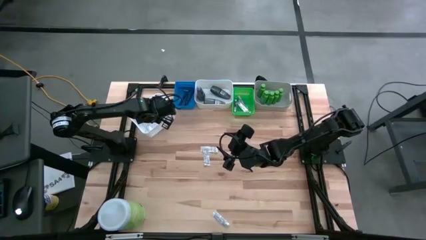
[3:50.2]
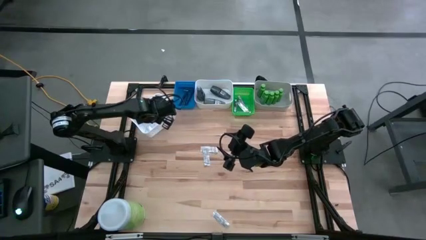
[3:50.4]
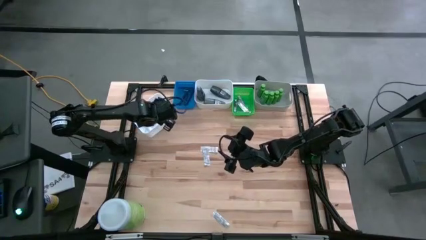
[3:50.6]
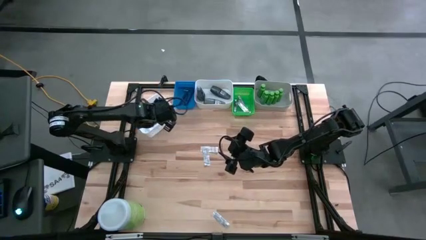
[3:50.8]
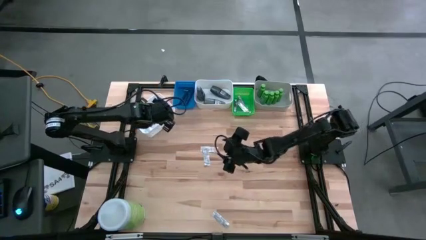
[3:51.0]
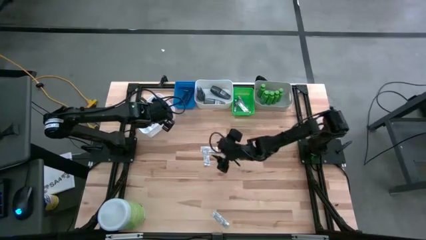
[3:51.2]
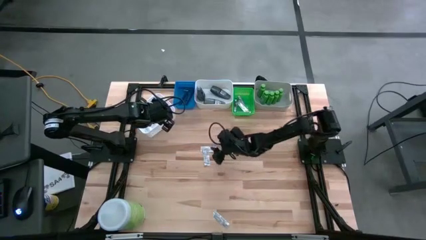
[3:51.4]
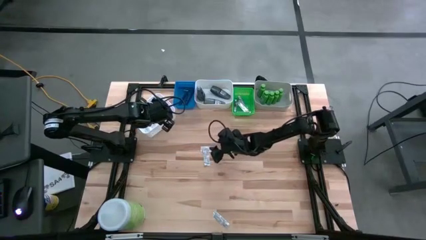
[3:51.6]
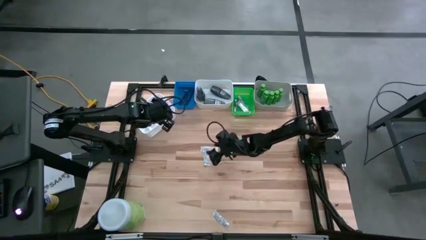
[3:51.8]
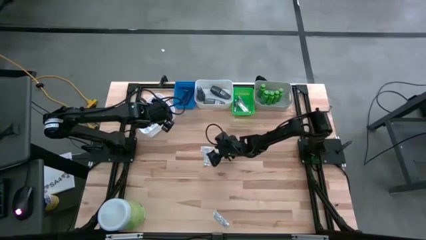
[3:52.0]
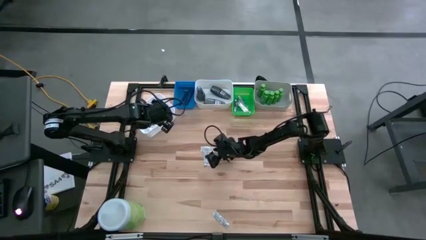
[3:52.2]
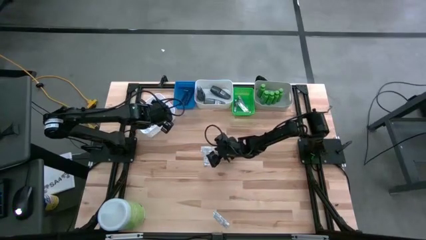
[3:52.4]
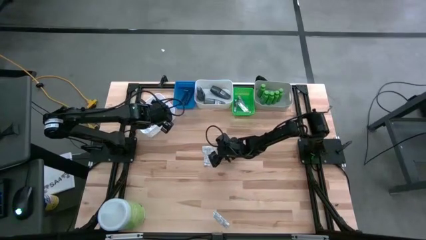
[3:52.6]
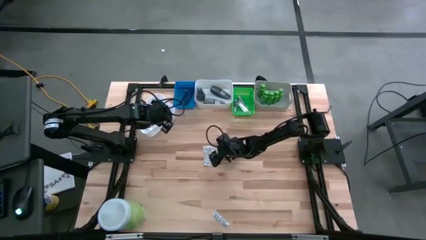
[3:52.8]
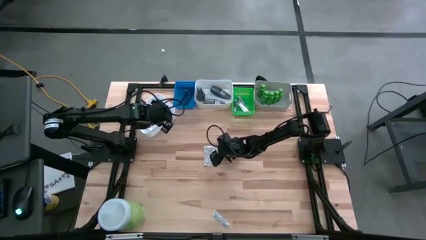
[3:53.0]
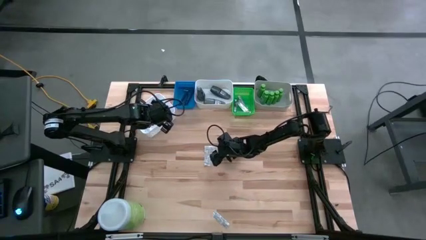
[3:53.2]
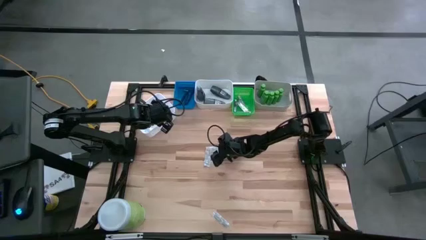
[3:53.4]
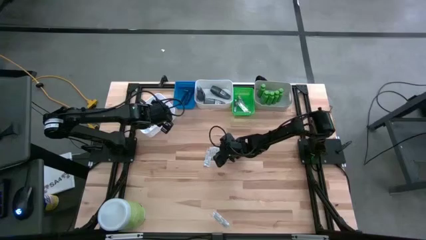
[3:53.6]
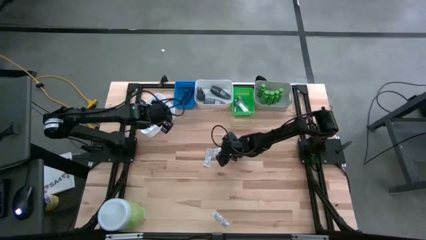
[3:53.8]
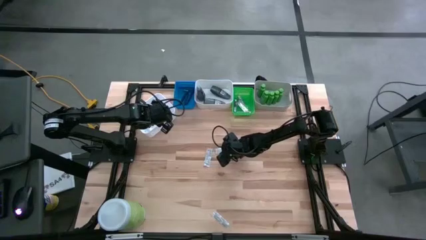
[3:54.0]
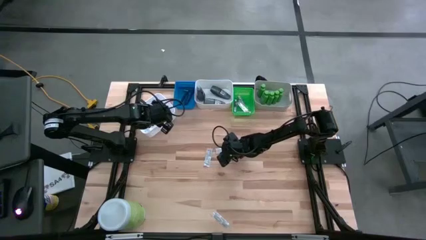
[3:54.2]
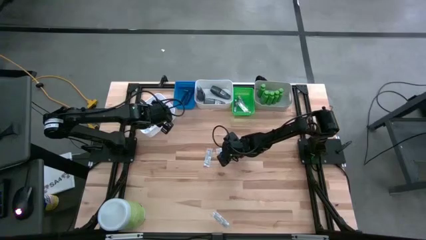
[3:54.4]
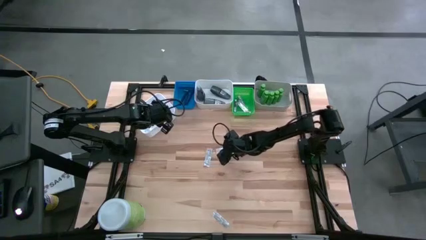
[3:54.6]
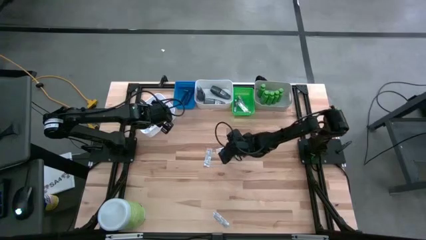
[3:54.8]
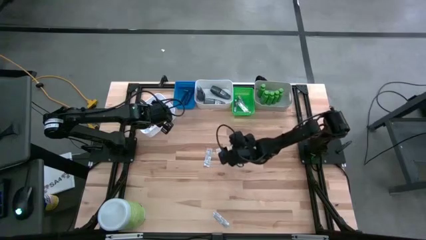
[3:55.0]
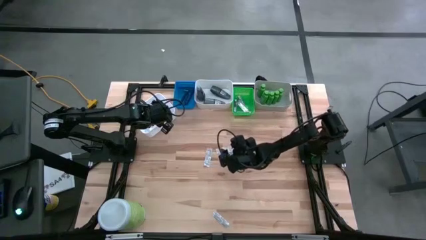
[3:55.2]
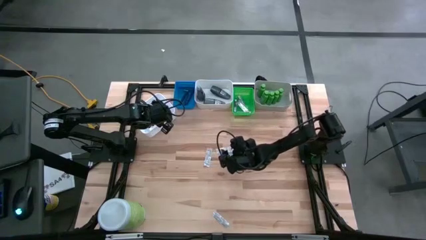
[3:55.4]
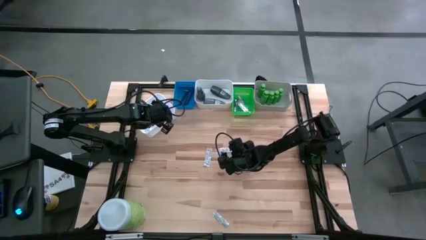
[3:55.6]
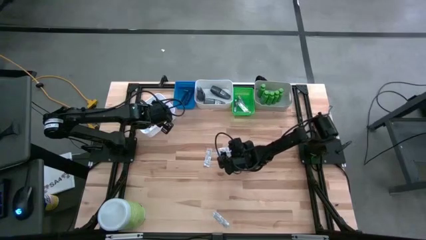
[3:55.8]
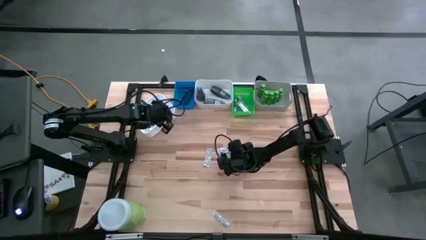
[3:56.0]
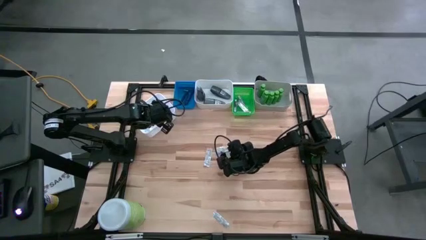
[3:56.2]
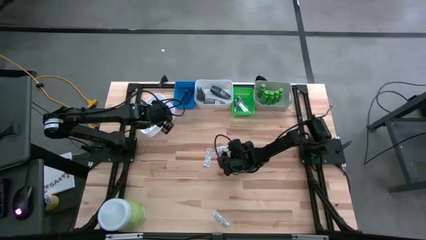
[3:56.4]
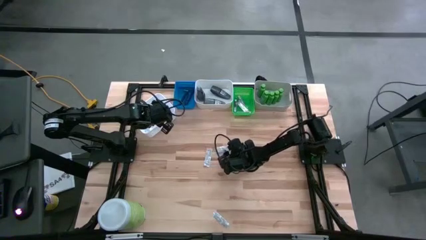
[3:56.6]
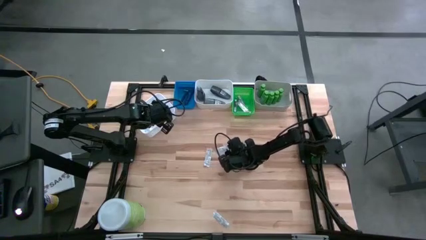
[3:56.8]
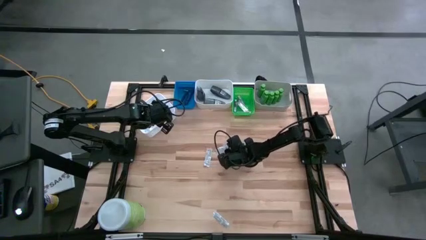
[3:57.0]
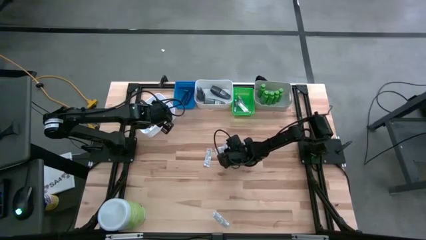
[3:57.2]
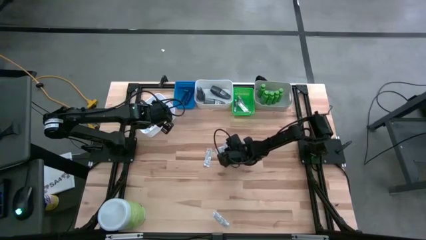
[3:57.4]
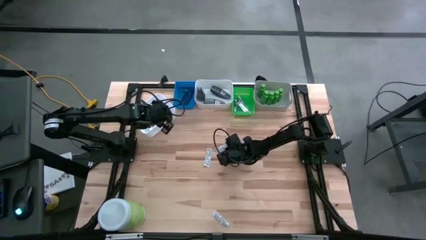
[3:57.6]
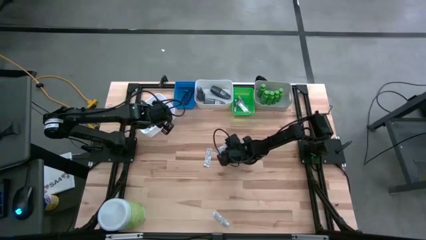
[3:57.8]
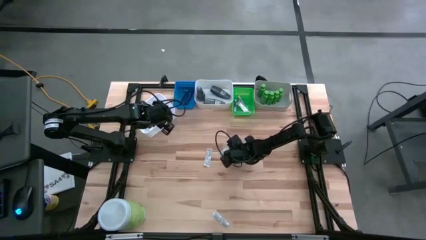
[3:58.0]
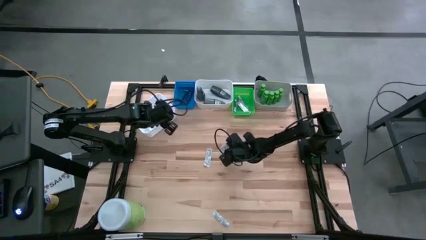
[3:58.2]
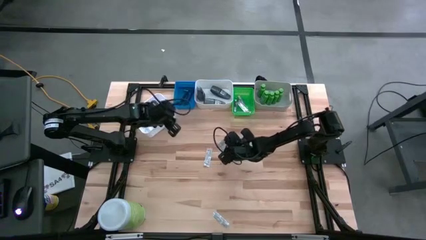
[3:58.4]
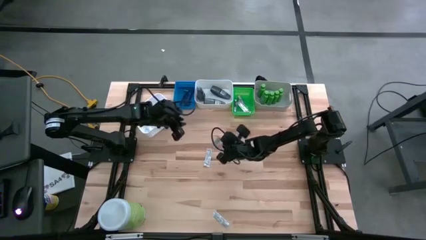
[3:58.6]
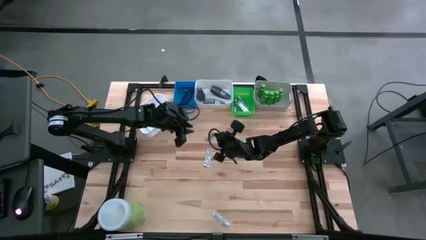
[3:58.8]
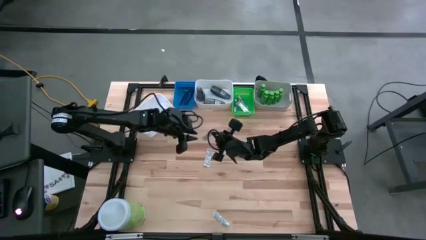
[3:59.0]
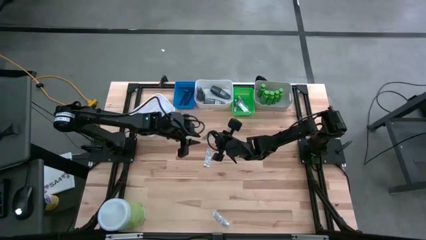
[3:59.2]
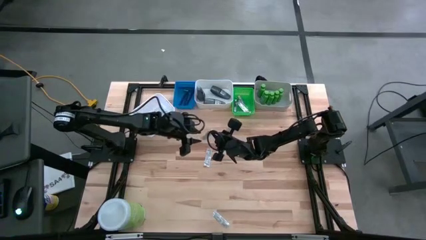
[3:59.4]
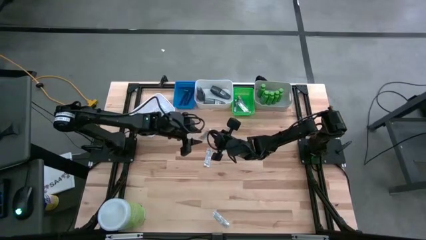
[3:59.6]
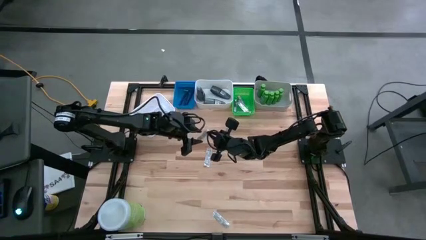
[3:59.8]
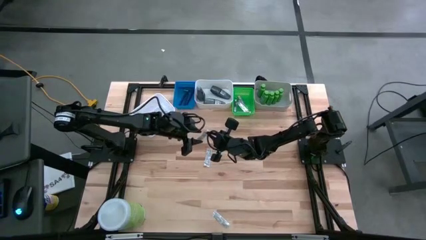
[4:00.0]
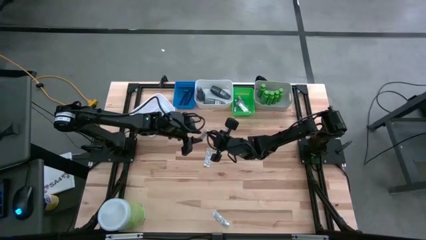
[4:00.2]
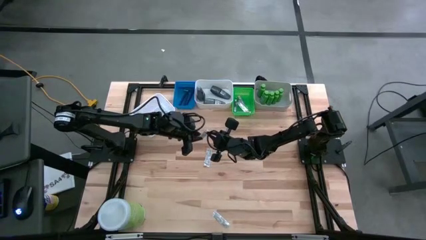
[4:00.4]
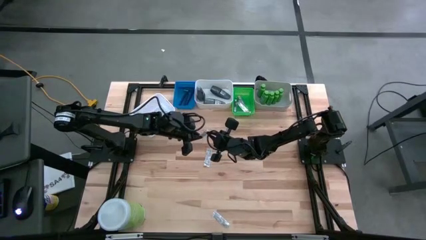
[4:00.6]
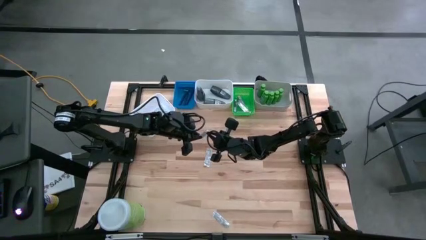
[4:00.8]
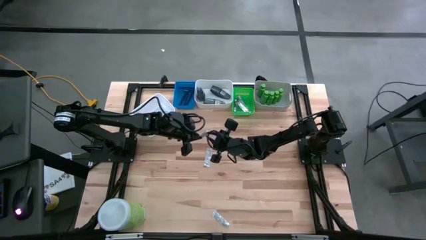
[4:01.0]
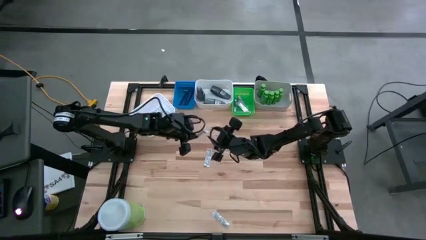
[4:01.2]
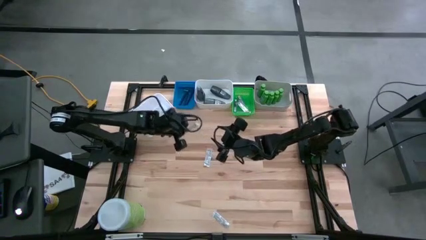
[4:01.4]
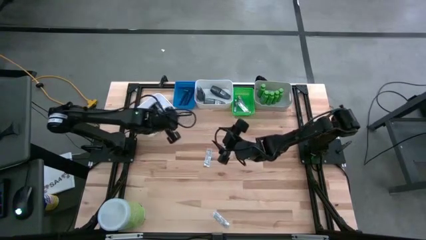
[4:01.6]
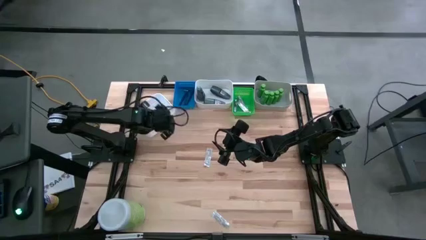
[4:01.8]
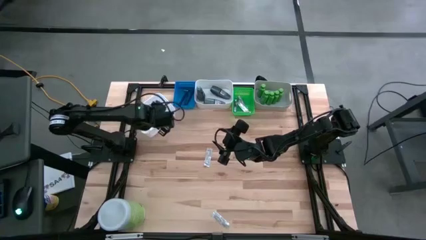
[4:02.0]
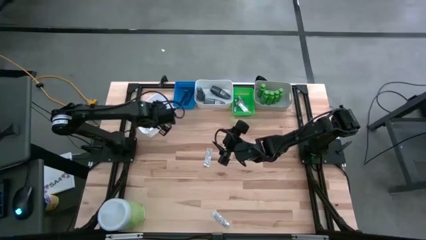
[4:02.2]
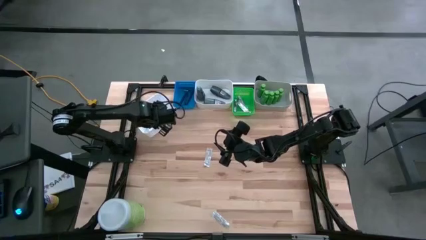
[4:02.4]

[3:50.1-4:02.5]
Task: Pick & Place Travel size toiletries
Put the bandage pack into the left white bin

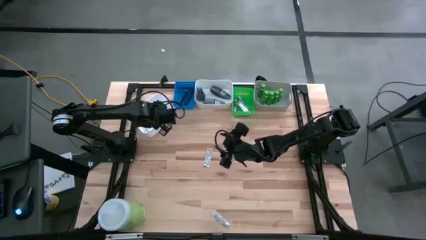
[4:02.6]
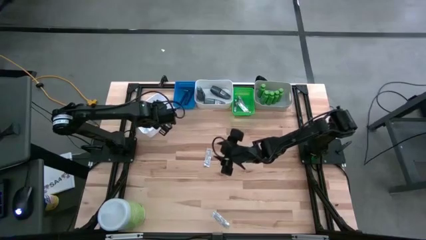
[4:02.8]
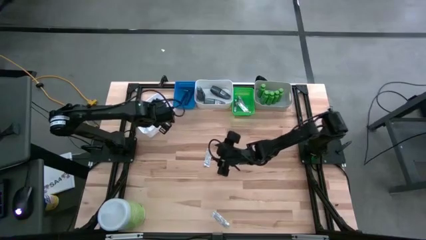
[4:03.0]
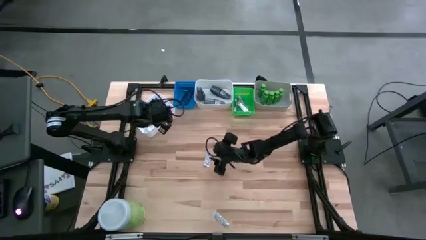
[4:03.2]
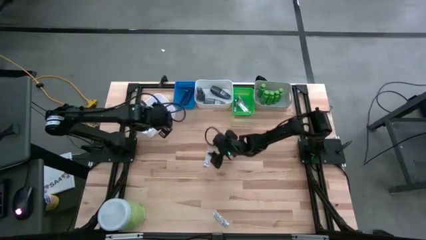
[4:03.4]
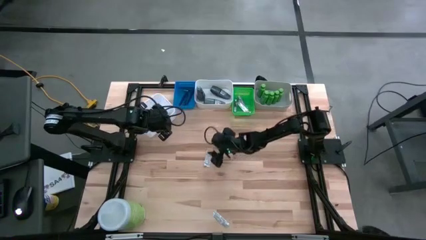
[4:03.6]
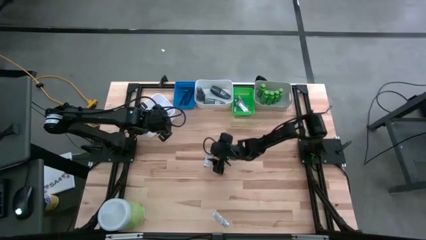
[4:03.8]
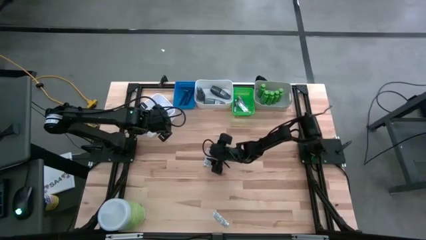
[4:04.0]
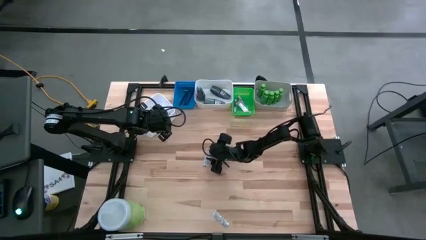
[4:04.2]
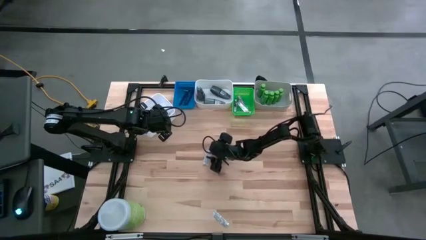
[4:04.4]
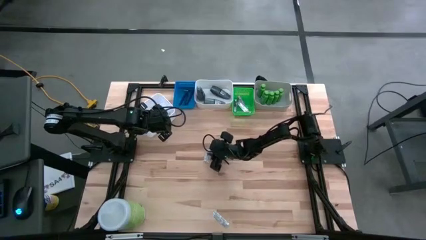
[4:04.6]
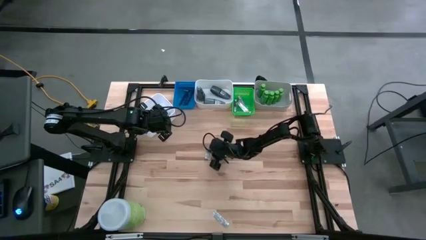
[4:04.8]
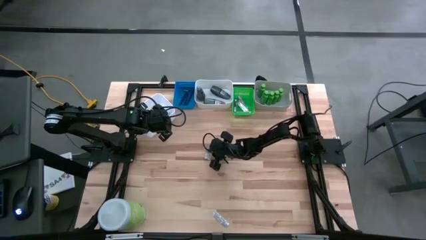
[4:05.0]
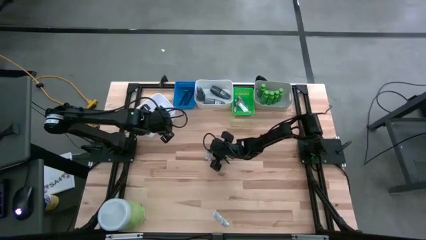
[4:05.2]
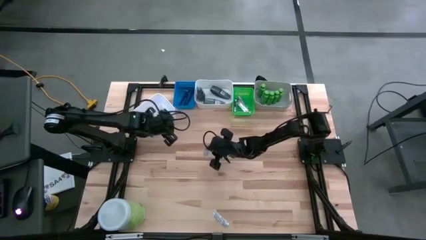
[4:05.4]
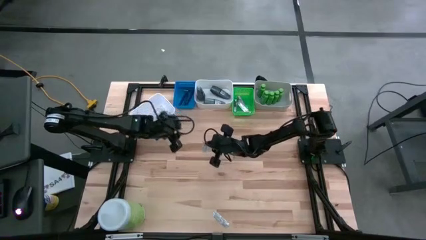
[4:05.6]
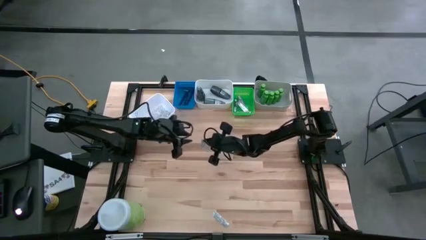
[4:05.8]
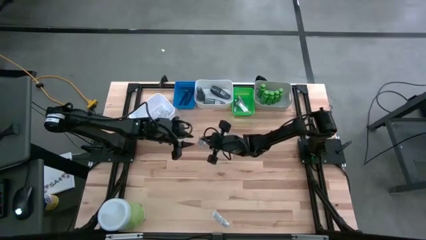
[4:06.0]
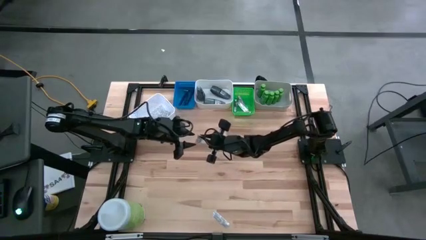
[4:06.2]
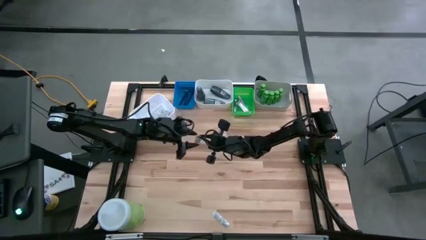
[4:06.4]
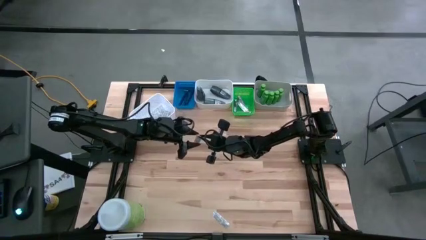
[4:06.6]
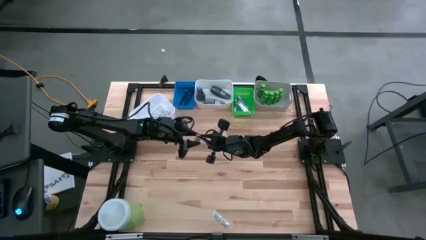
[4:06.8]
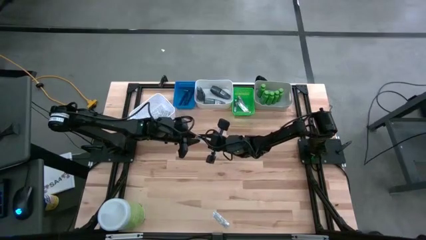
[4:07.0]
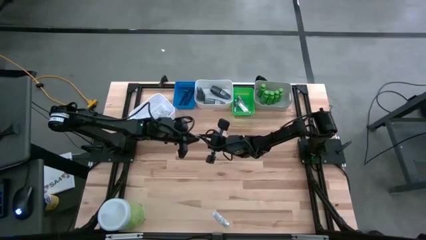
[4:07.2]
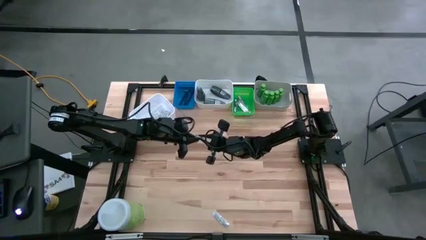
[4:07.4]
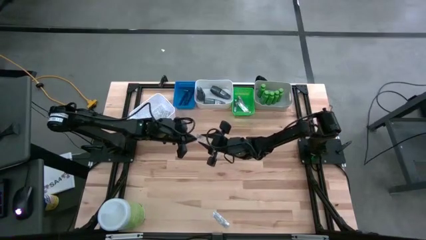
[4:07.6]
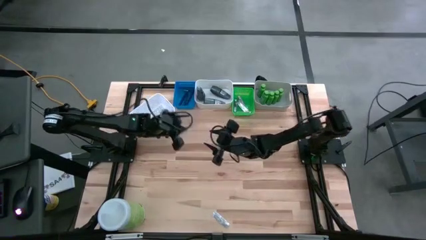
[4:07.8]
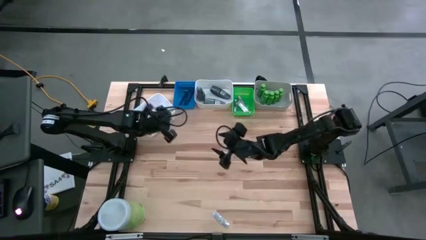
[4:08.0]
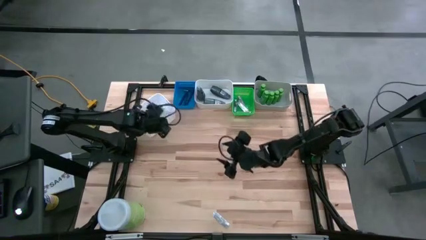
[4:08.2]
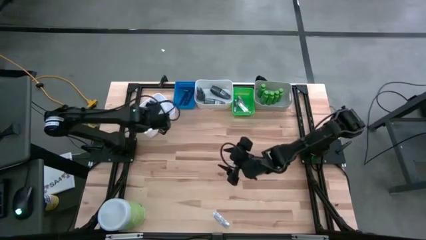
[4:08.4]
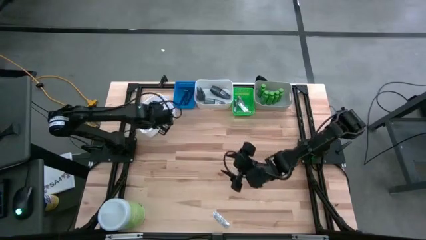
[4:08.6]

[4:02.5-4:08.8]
Put the bandage pack into the left white bin
